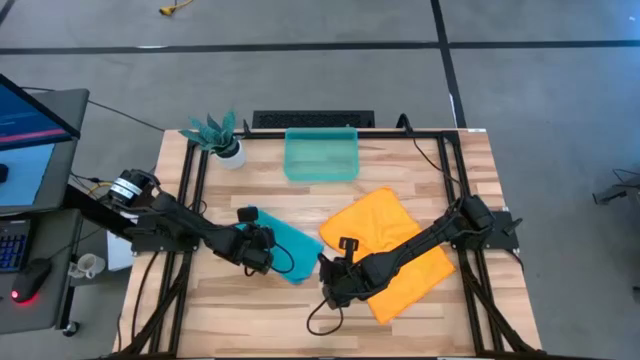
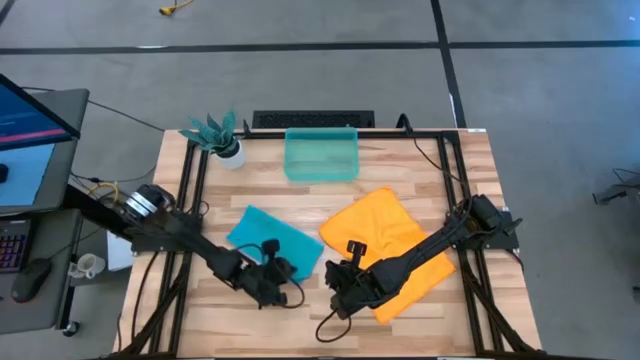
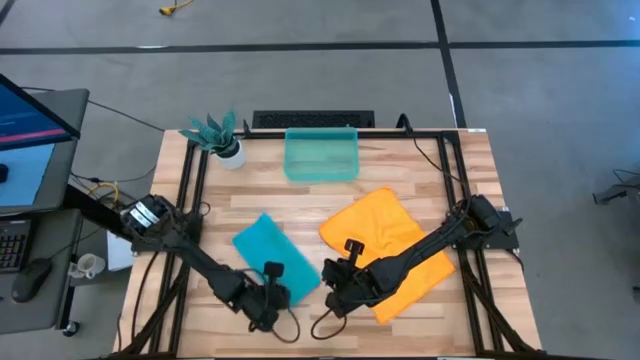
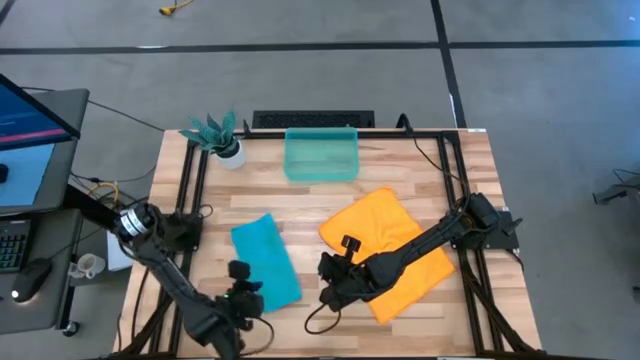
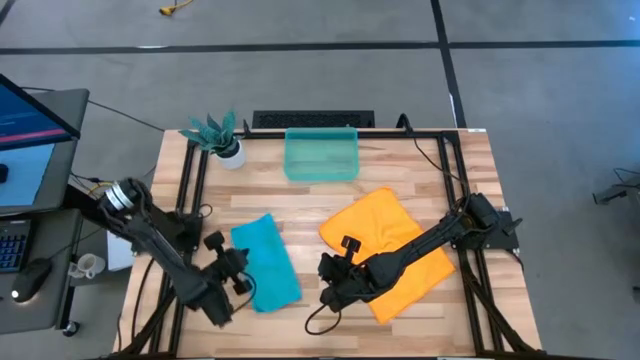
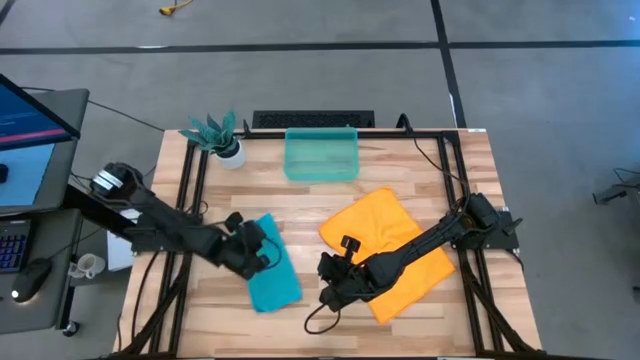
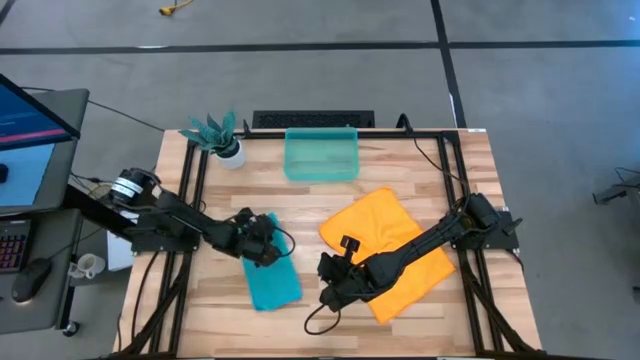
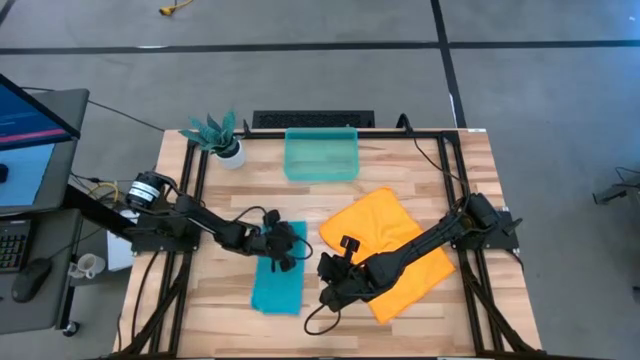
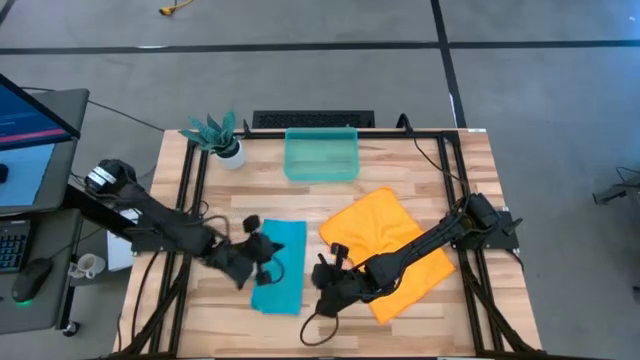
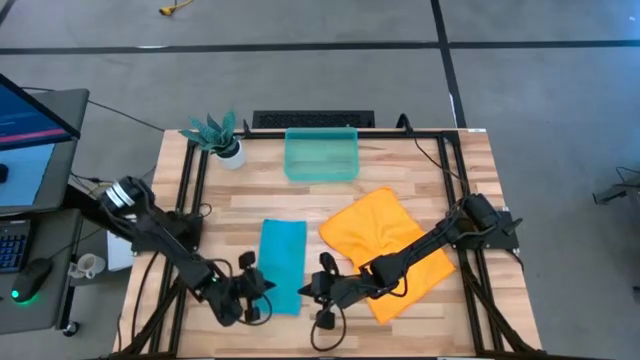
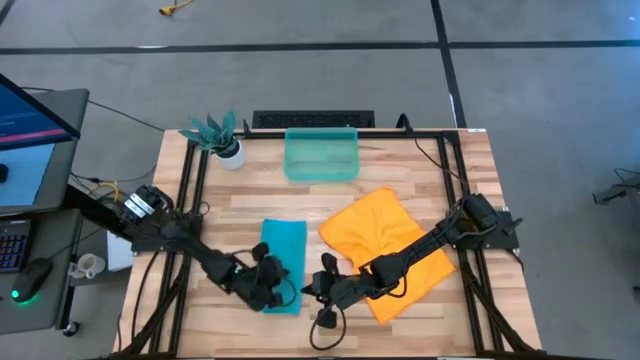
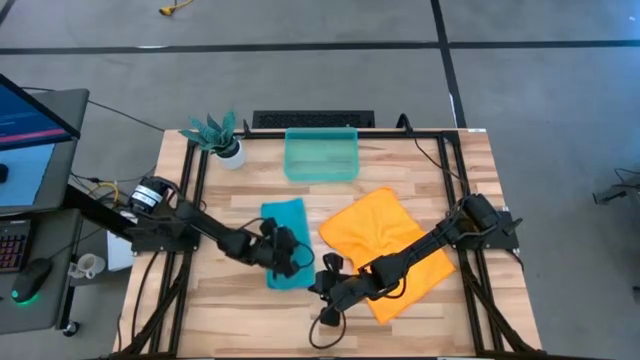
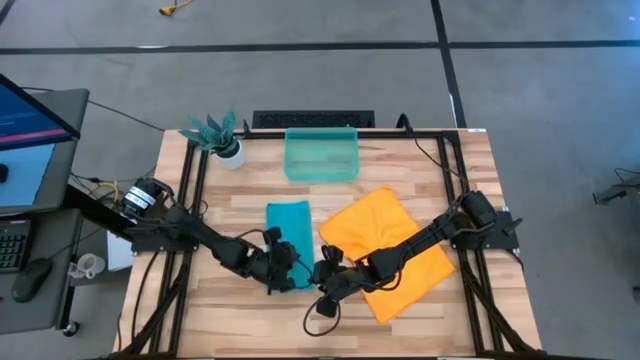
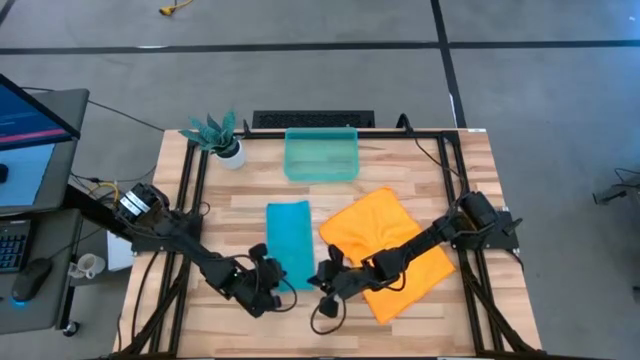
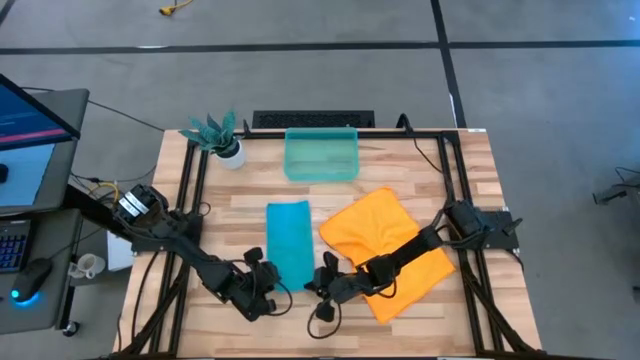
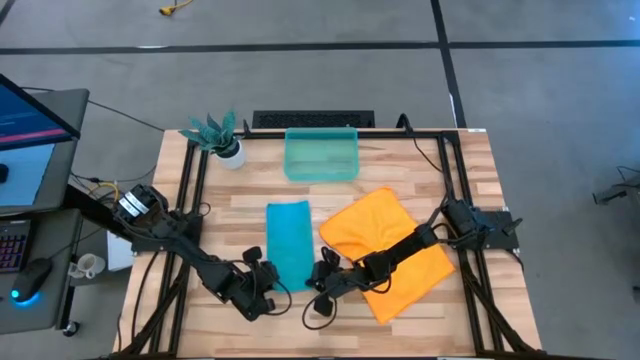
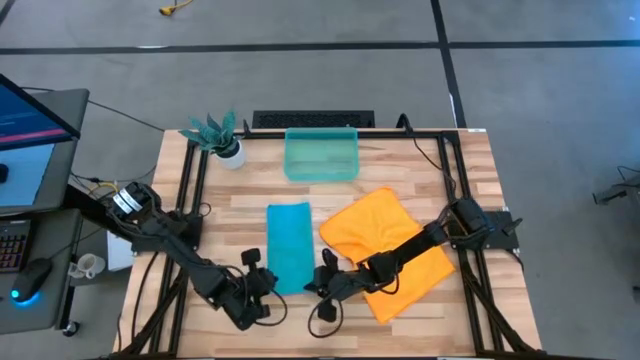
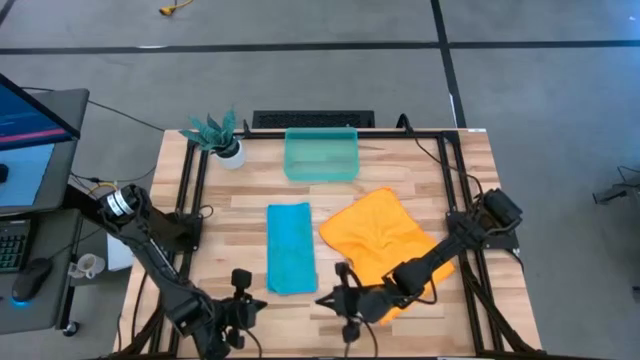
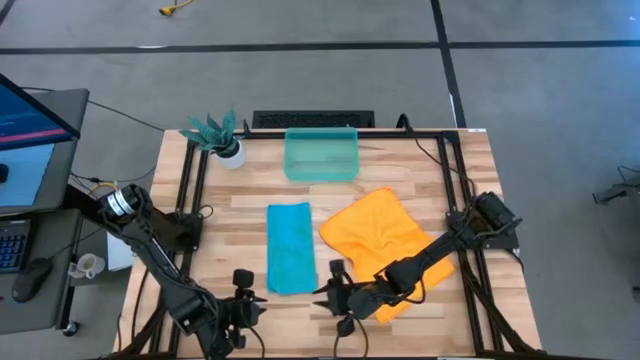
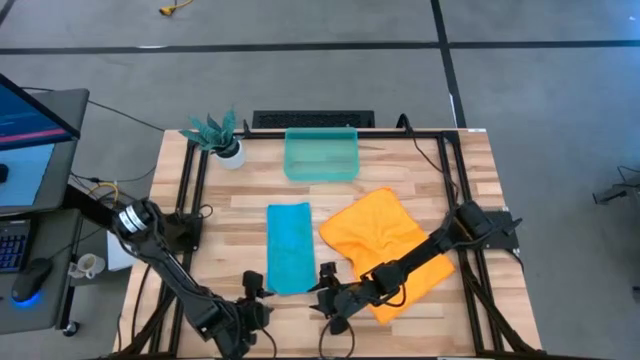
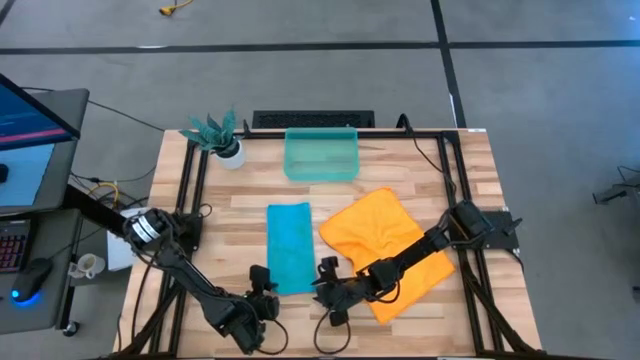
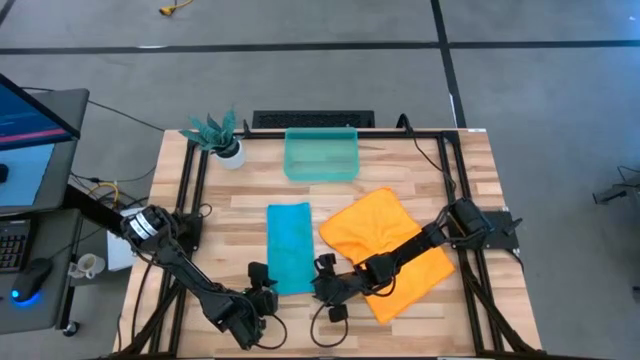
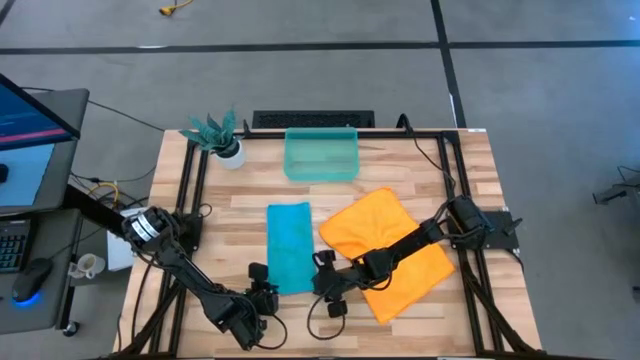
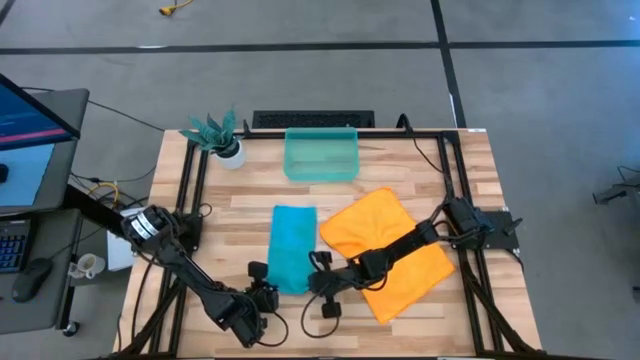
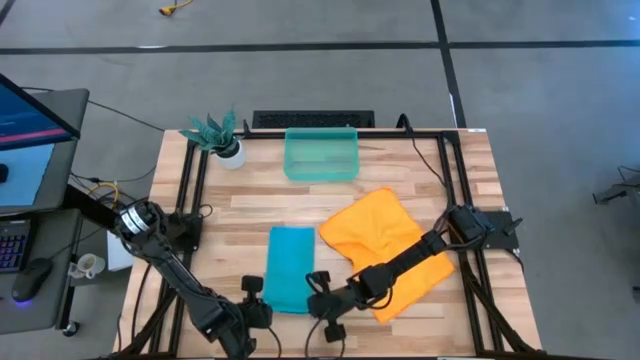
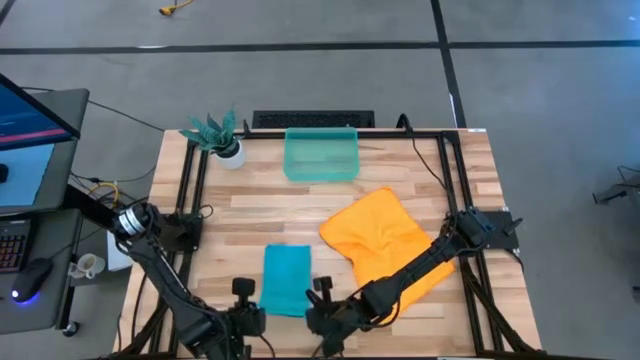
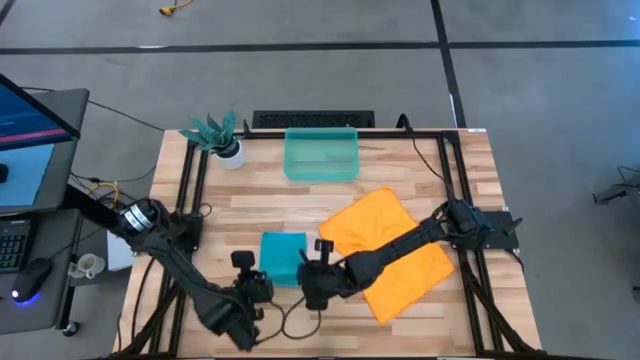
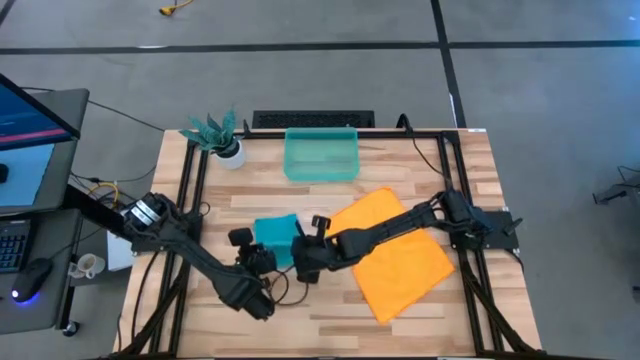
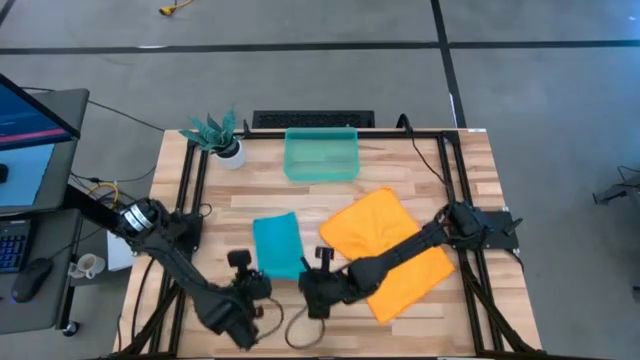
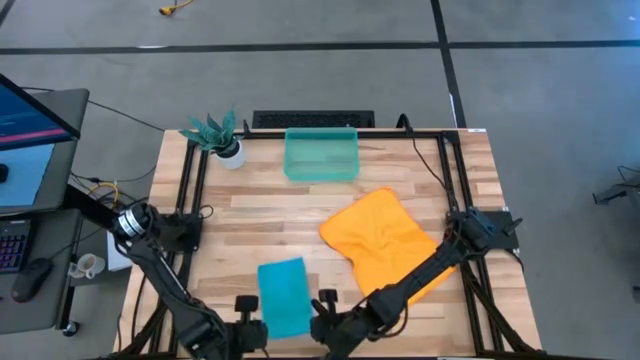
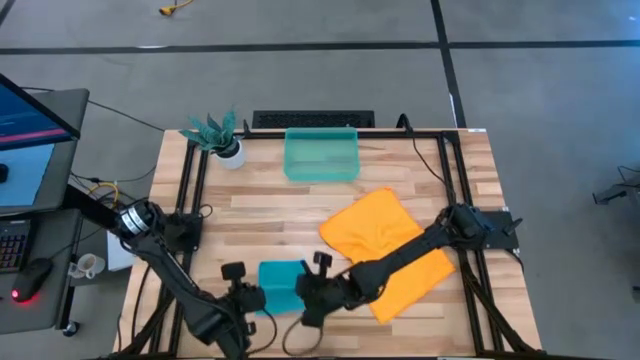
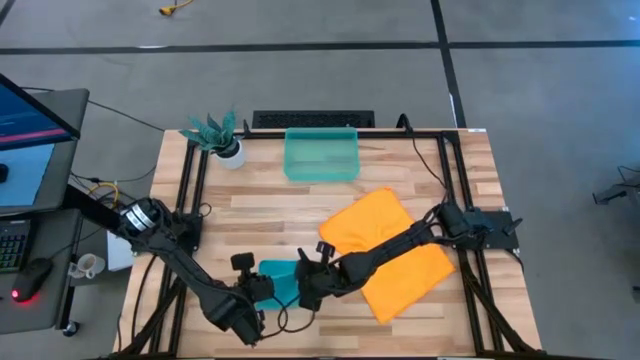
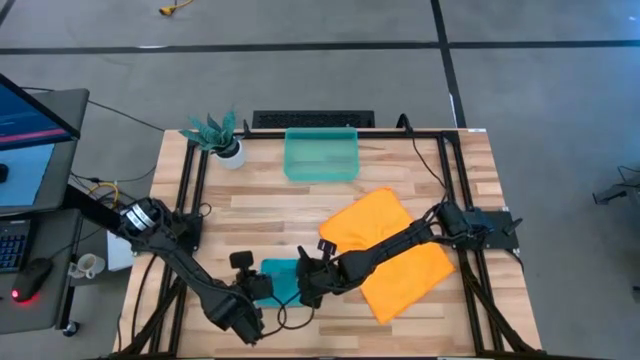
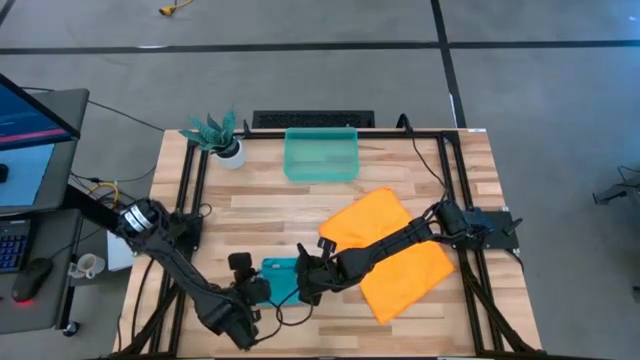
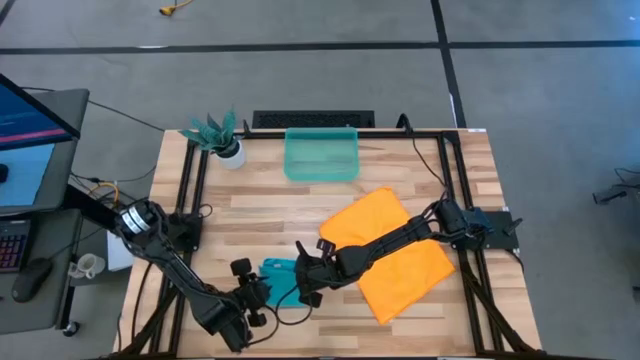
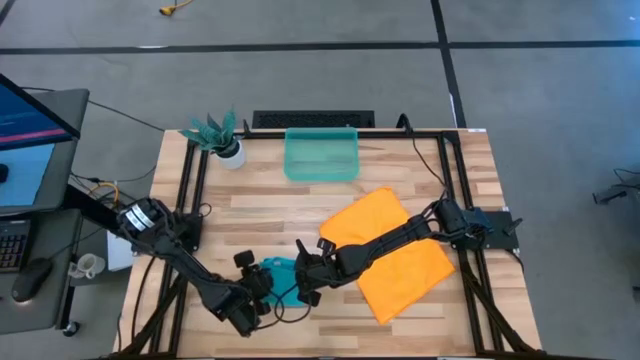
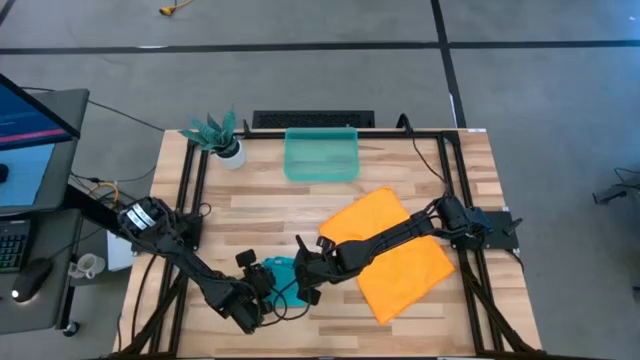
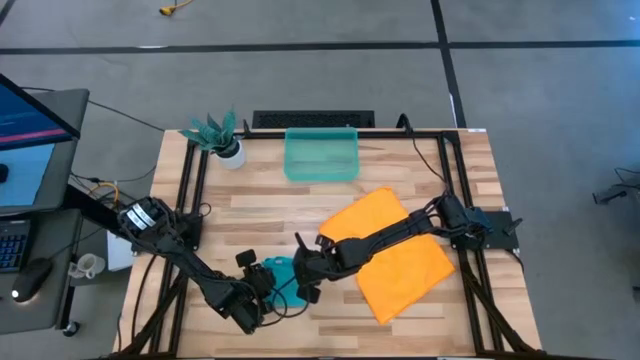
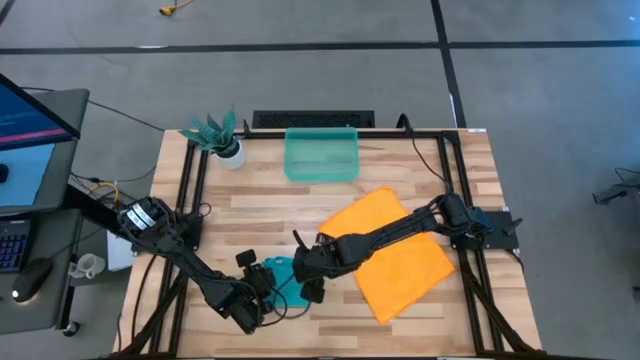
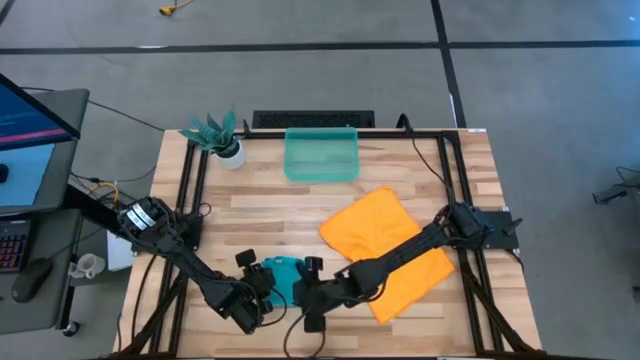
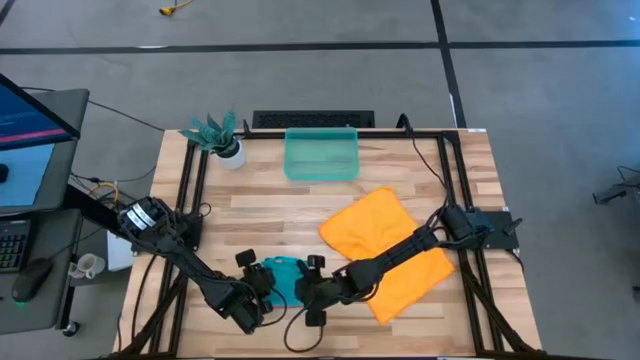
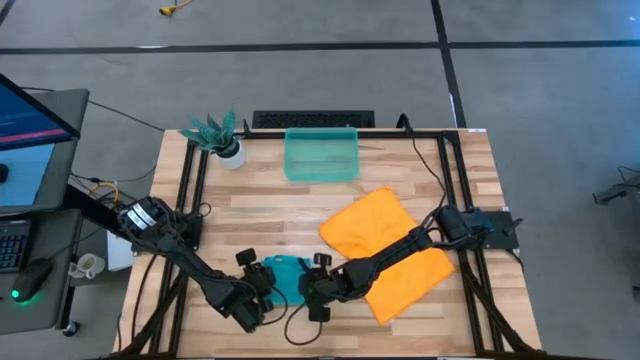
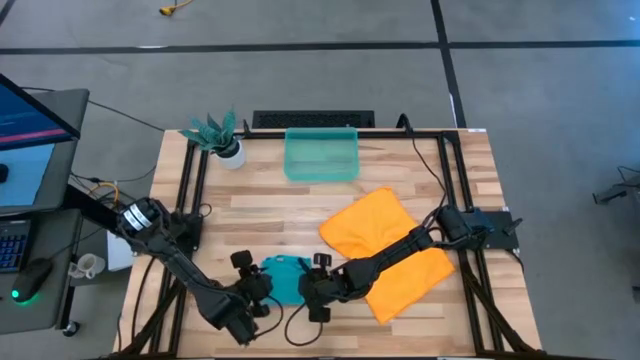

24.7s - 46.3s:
Task: Roll microfiber towels into tight, uniform cylinder then place into a basket
Fold the blue microfiber cloth
